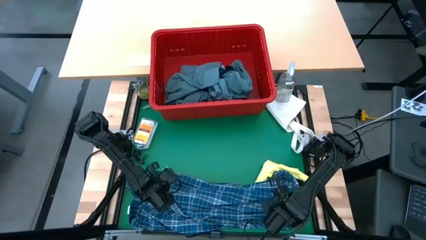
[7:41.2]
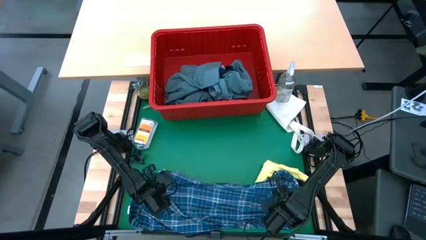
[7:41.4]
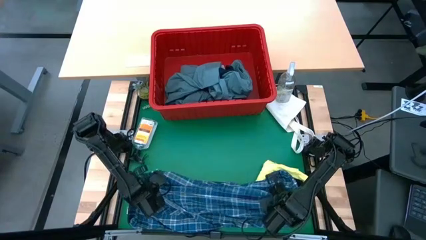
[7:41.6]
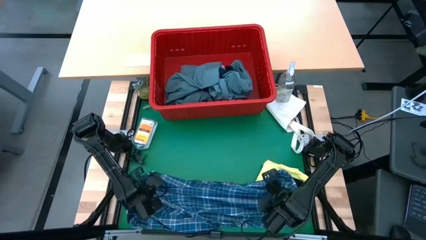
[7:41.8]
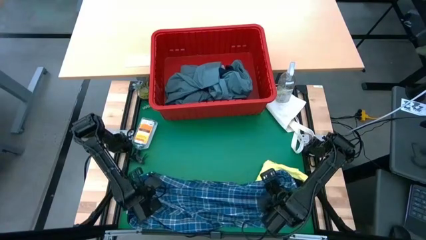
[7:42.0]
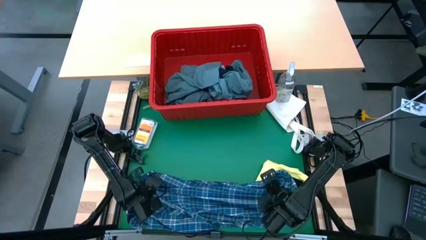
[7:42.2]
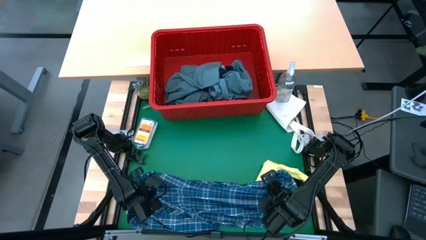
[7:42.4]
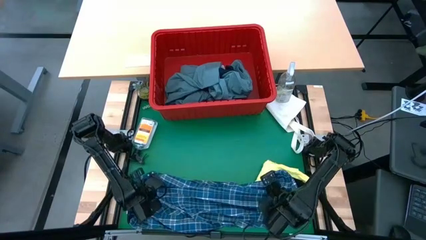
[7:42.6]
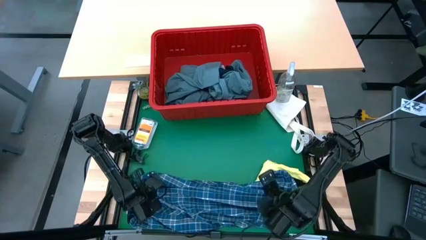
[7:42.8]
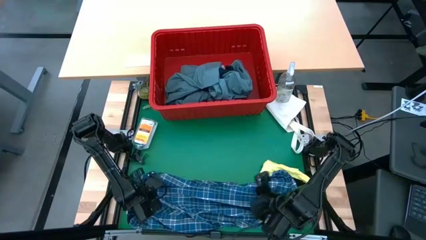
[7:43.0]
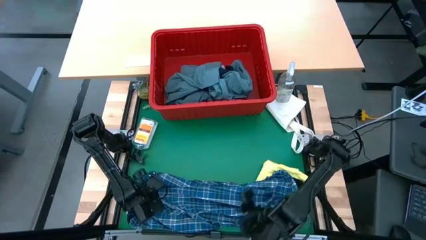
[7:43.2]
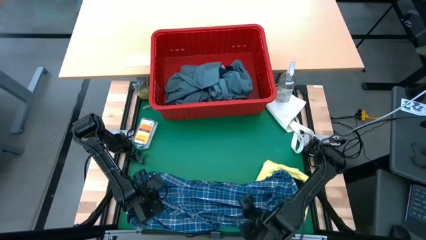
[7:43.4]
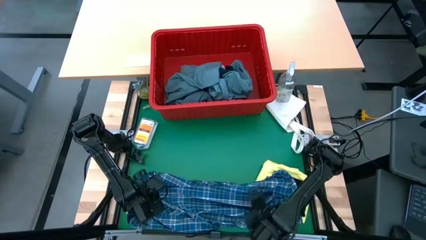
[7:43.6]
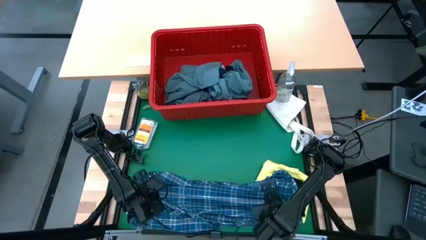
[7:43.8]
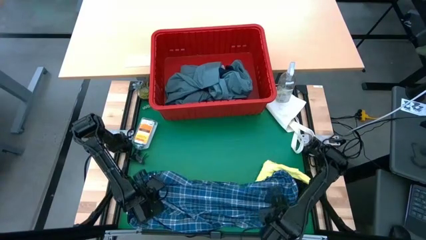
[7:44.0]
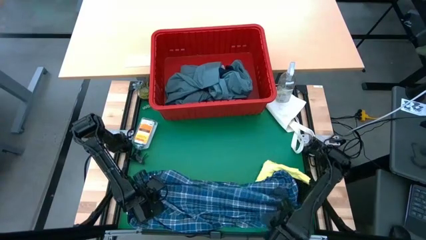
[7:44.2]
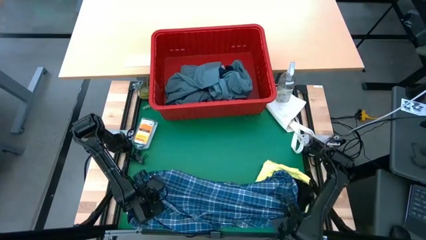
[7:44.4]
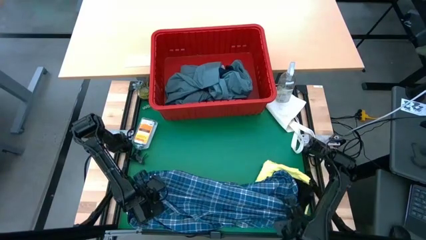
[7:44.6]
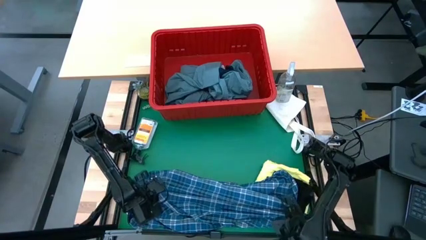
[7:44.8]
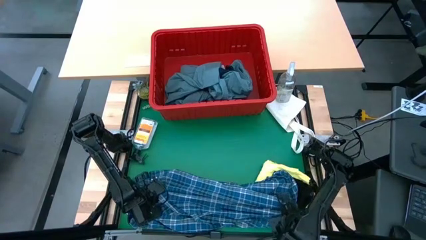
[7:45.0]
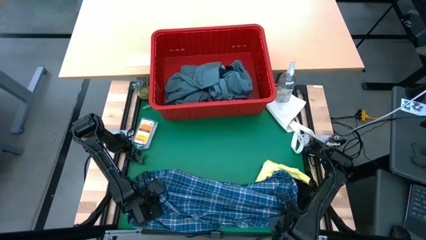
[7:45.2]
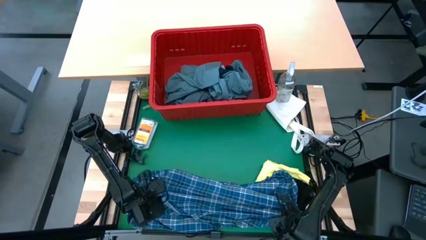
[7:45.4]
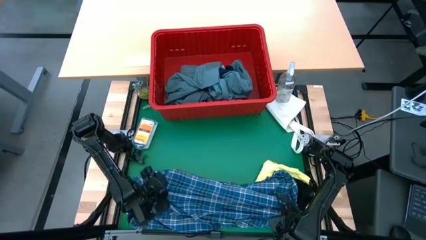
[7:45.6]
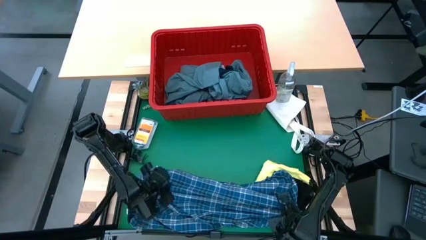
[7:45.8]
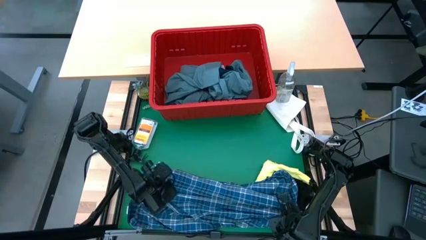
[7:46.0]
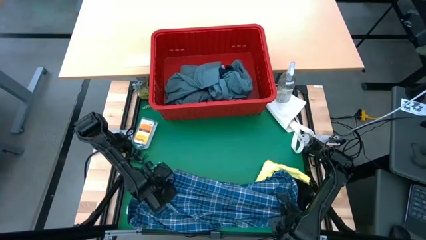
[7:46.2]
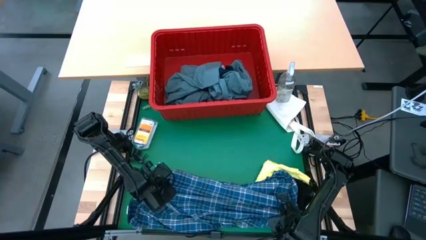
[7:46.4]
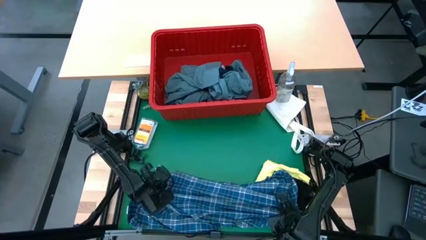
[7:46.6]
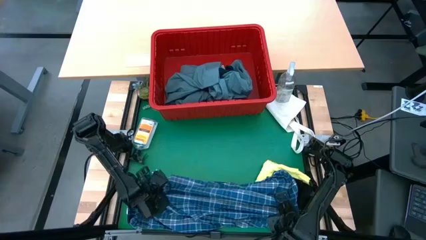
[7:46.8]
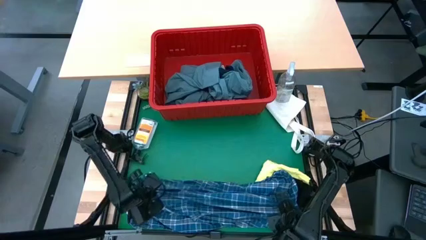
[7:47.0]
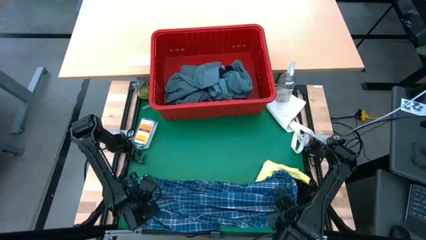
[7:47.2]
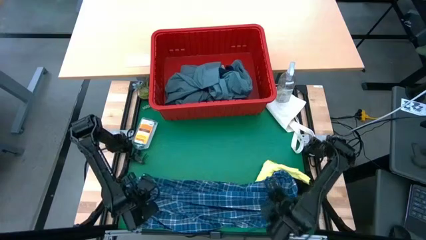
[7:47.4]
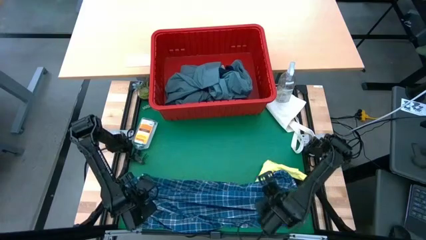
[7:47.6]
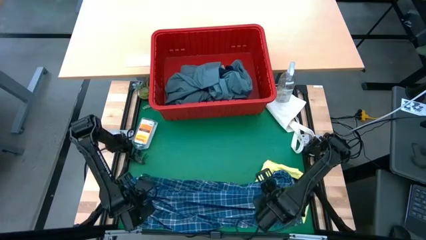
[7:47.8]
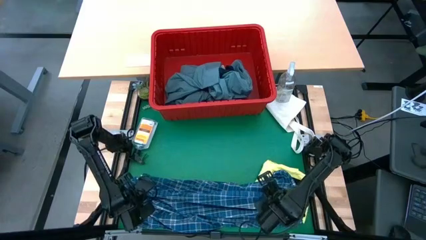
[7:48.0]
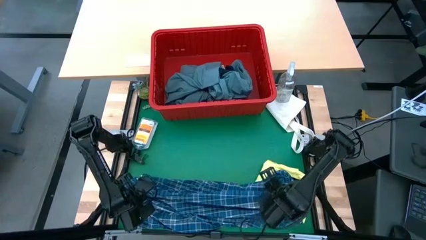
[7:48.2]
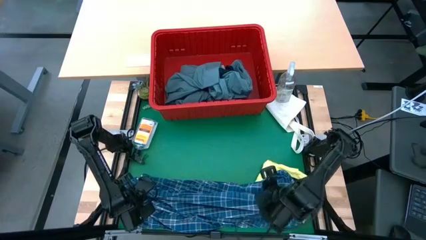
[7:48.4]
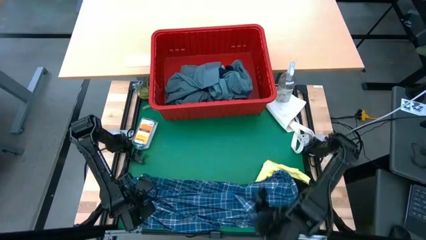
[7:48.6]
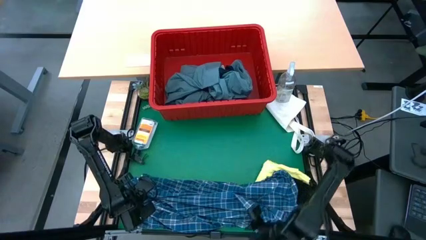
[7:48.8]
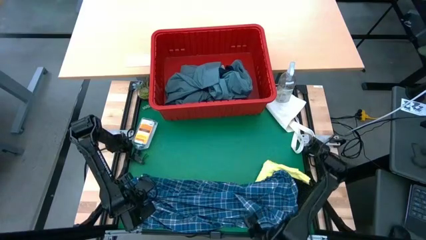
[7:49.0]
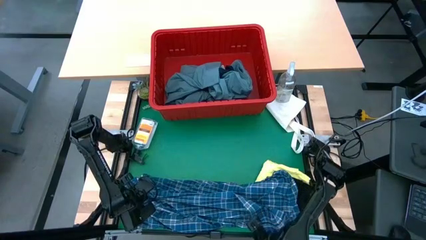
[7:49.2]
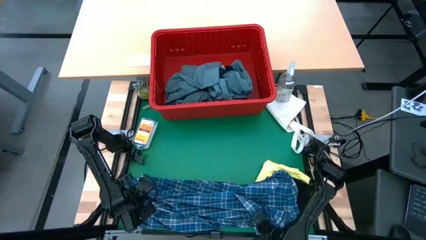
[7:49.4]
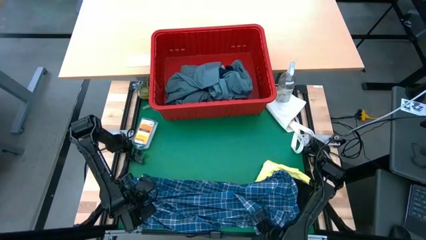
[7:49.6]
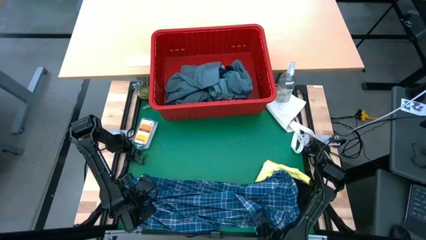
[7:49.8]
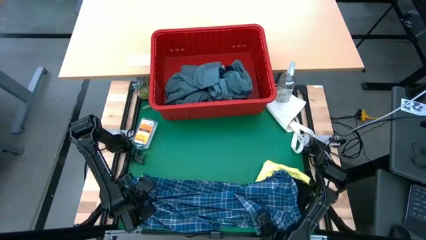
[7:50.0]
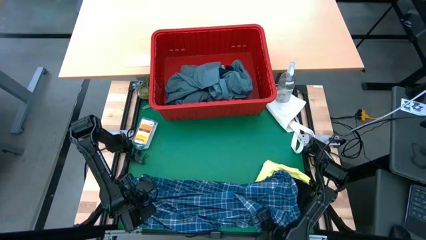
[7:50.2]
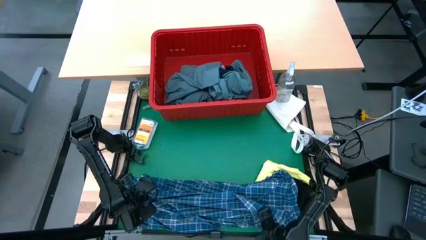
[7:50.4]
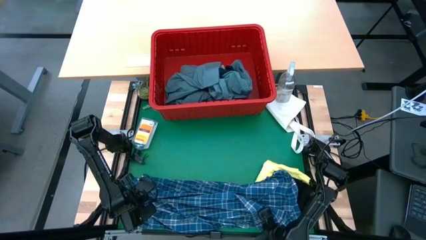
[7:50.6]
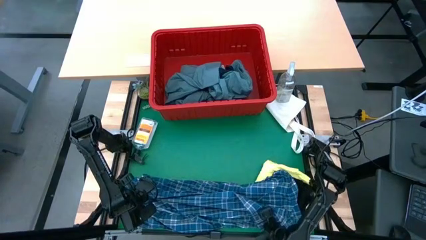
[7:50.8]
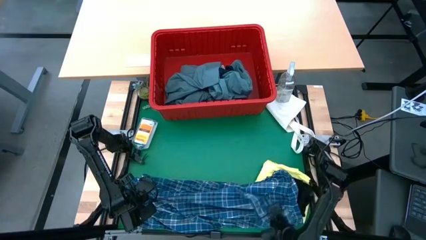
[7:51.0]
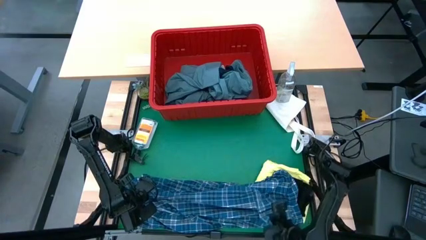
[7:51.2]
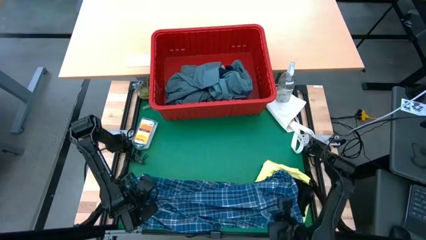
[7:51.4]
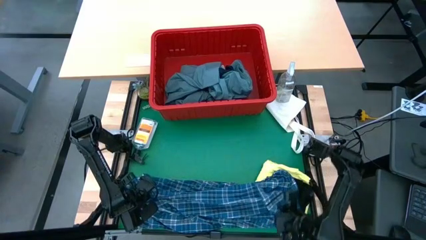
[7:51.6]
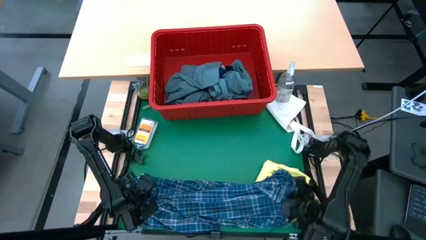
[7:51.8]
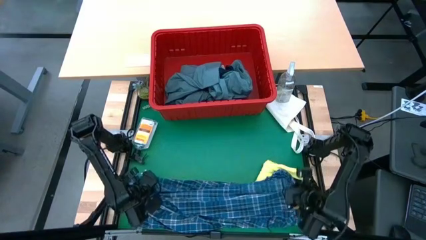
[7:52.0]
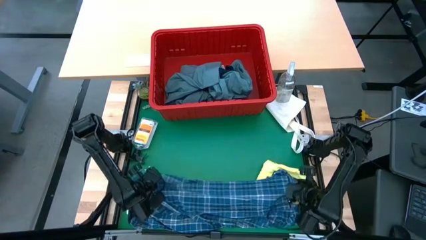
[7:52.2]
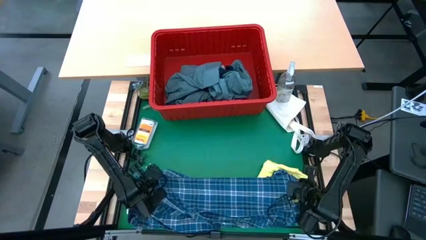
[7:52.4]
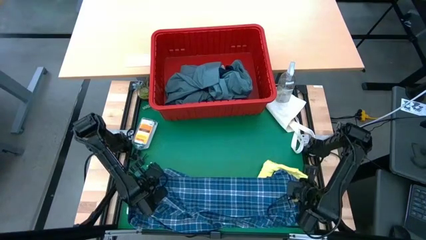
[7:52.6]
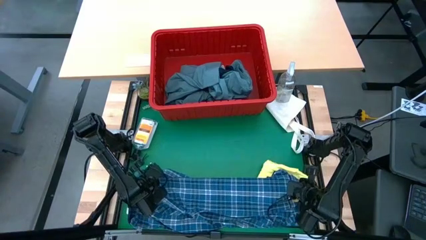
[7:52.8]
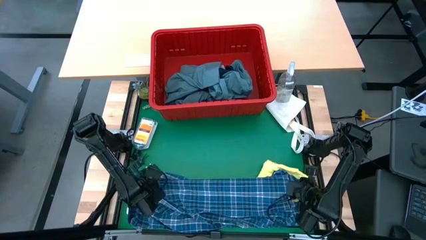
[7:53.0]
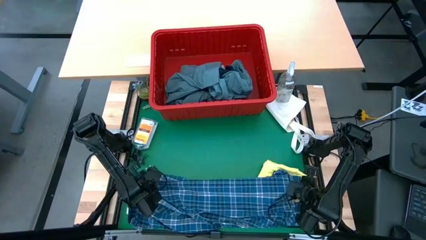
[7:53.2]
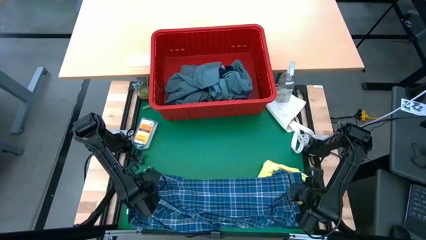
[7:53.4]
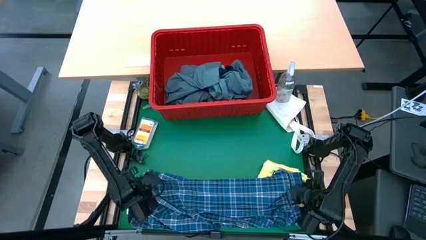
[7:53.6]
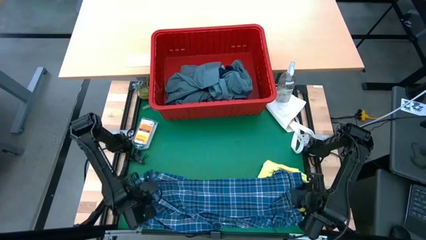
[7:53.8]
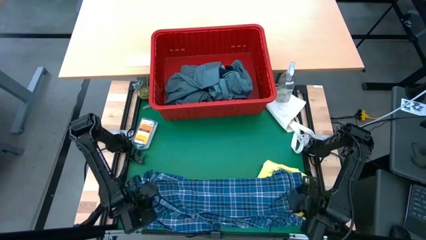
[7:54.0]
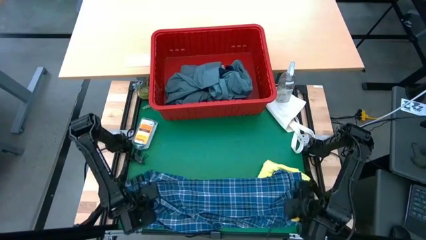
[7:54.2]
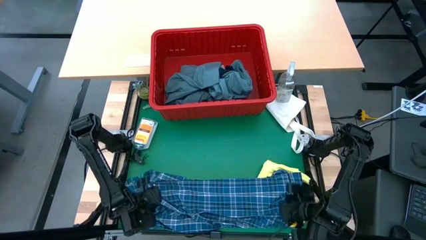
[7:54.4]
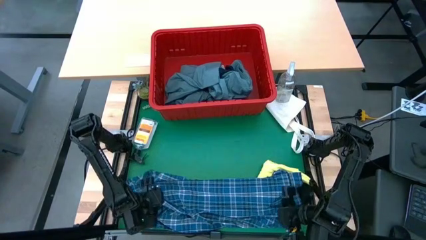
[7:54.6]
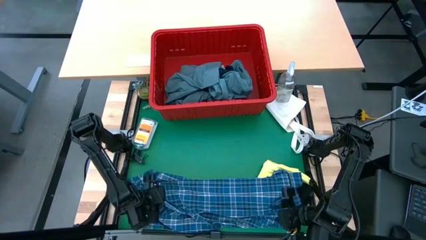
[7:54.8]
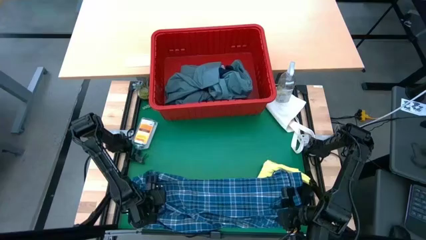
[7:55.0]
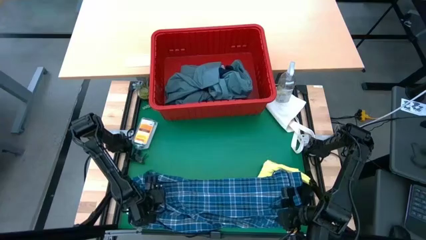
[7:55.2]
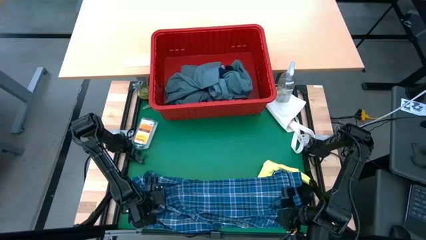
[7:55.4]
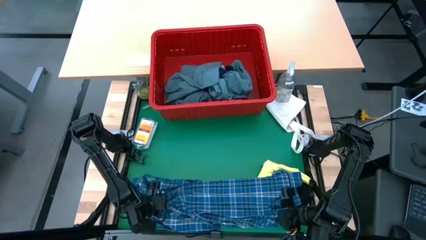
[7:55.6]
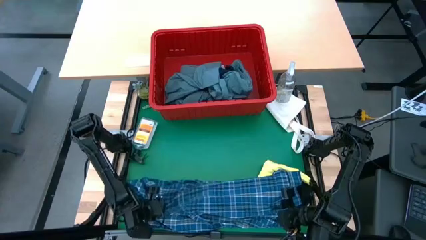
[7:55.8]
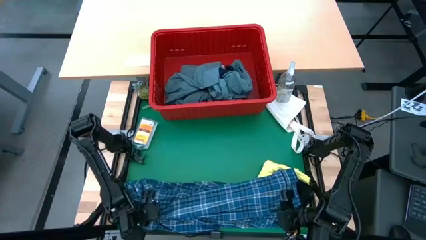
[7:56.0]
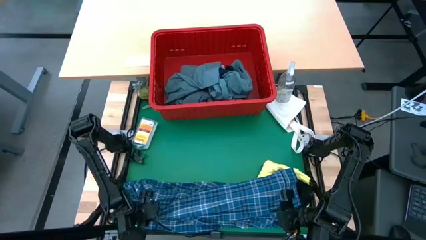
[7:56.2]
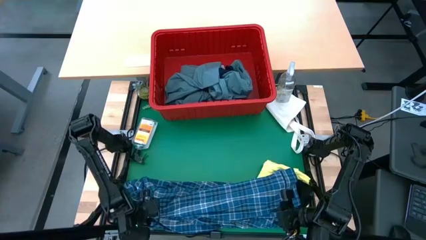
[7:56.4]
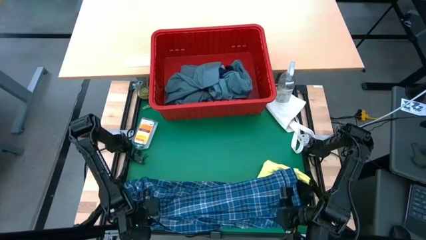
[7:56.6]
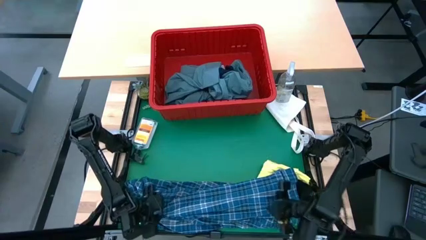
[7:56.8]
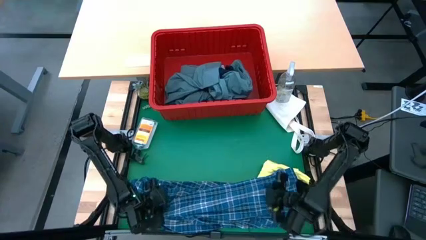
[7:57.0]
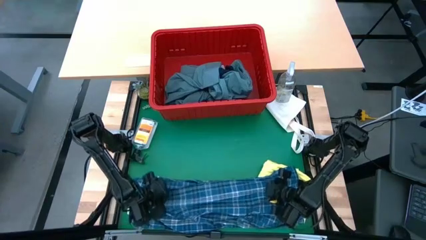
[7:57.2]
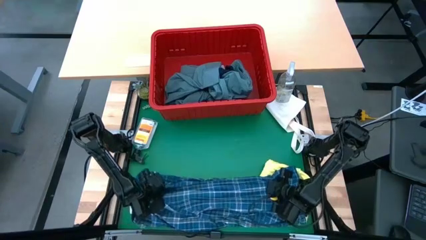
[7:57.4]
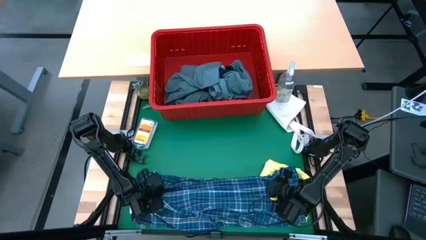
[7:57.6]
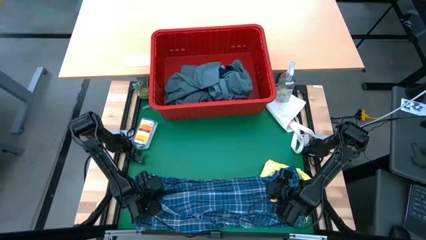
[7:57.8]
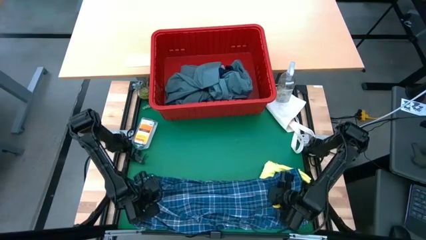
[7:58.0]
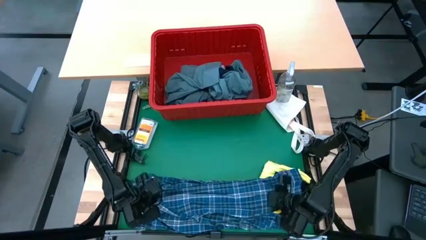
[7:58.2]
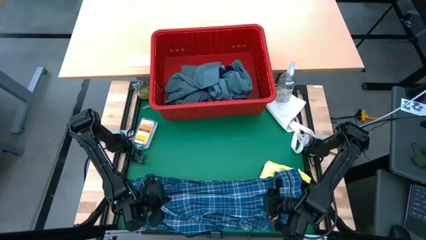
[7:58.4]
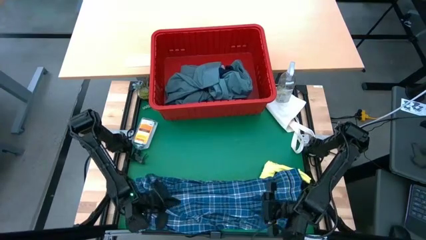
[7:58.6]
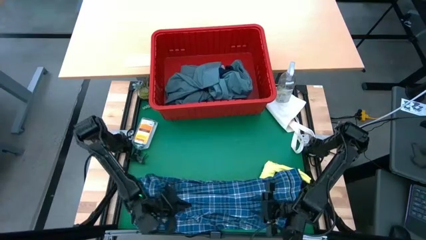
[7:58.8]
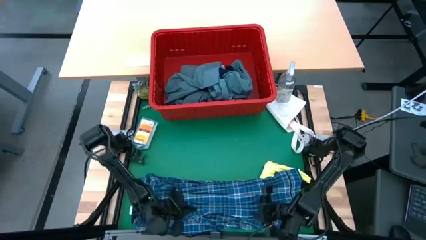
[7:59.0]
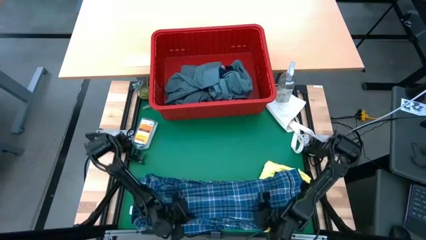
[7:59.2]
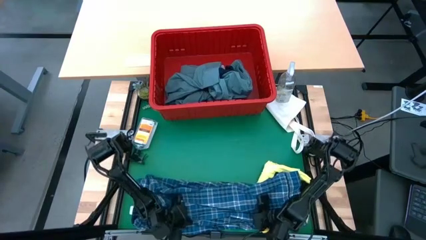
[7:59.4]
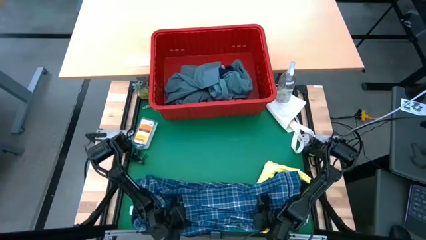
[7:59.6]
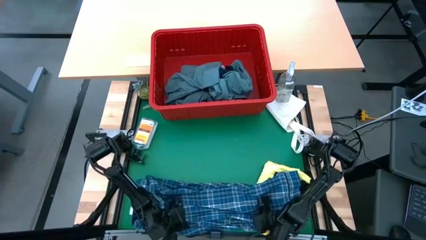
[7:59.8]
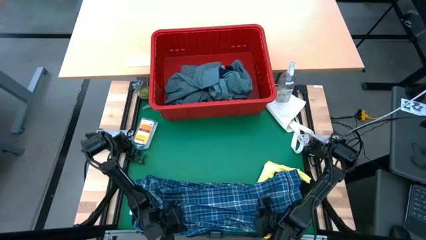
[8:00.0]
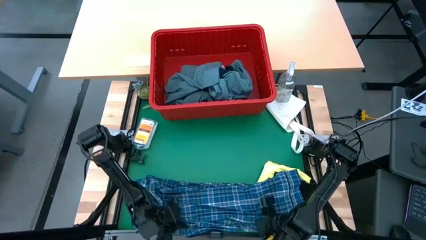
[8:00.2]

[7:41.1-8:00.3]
Task: Fold Laundry from Bin
Fold the blue shirt
